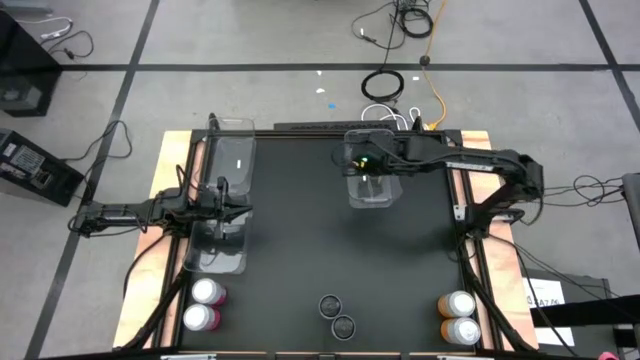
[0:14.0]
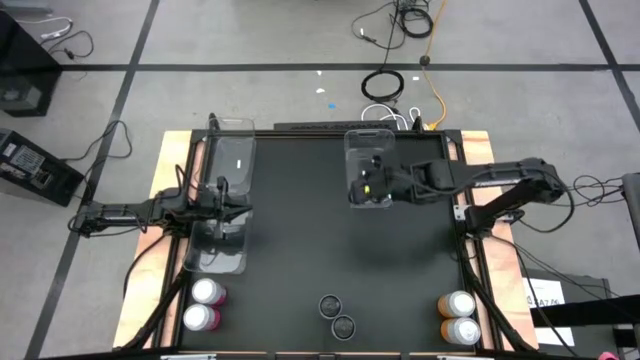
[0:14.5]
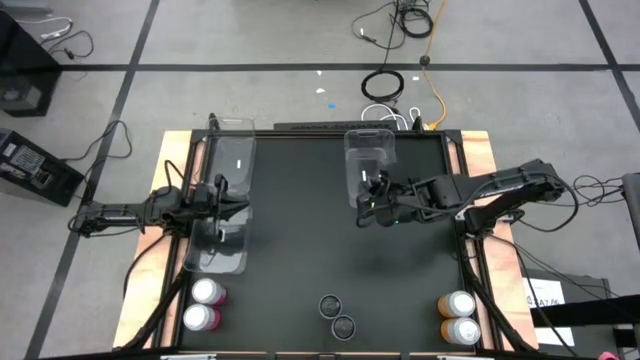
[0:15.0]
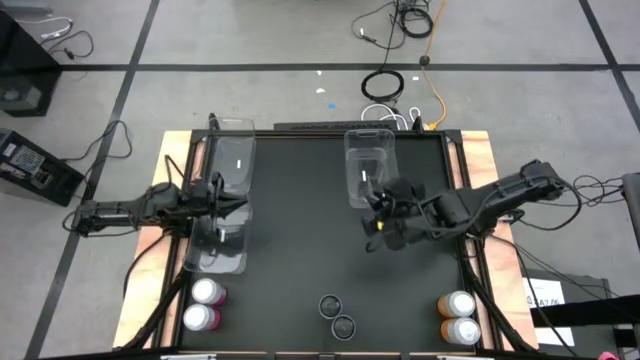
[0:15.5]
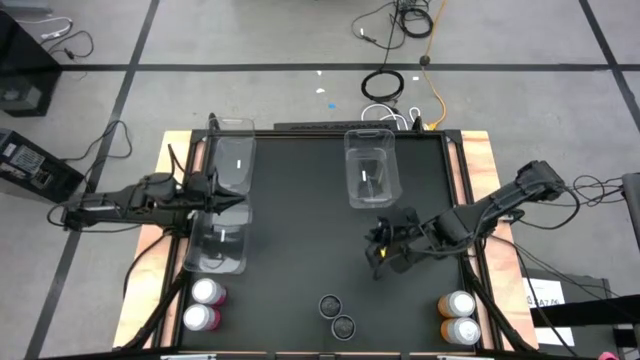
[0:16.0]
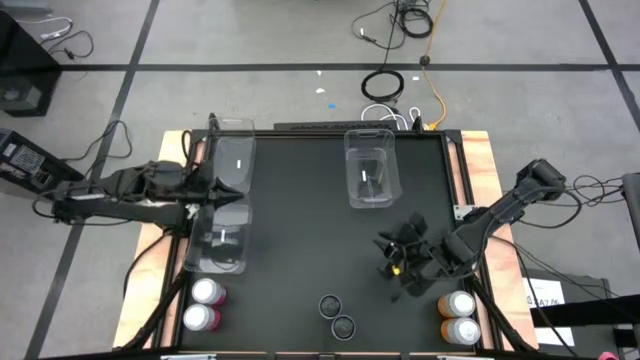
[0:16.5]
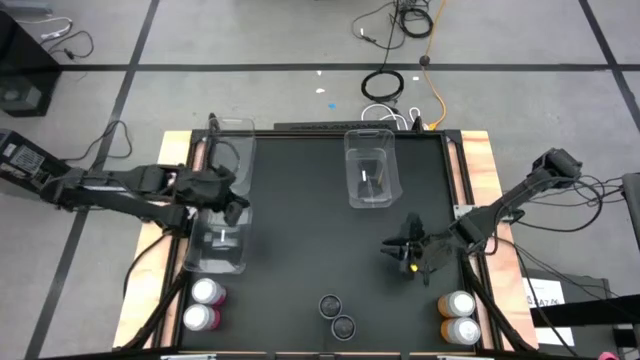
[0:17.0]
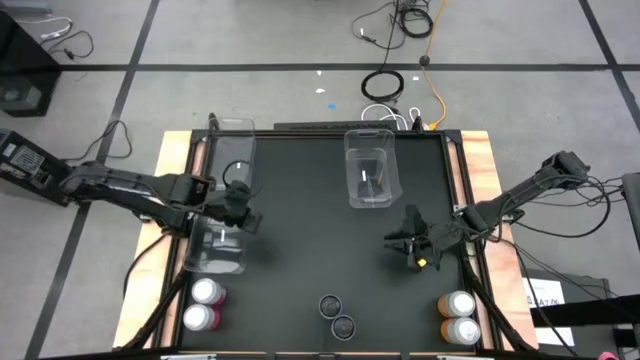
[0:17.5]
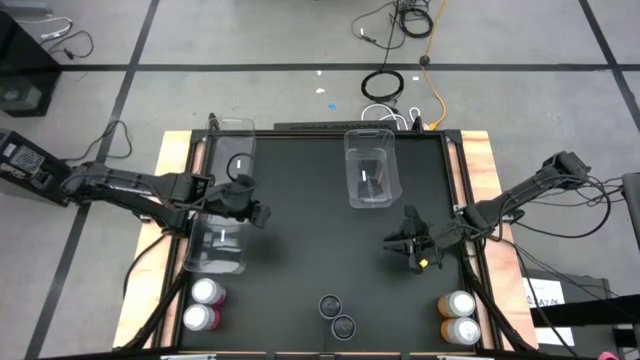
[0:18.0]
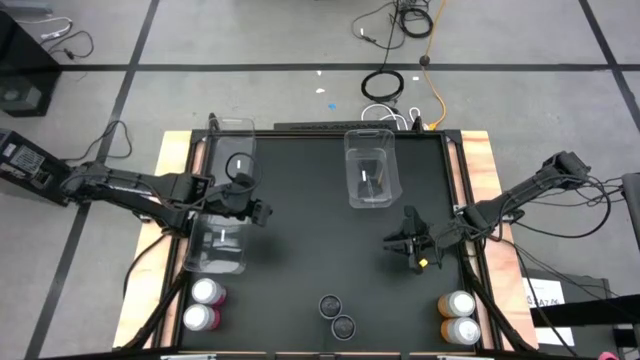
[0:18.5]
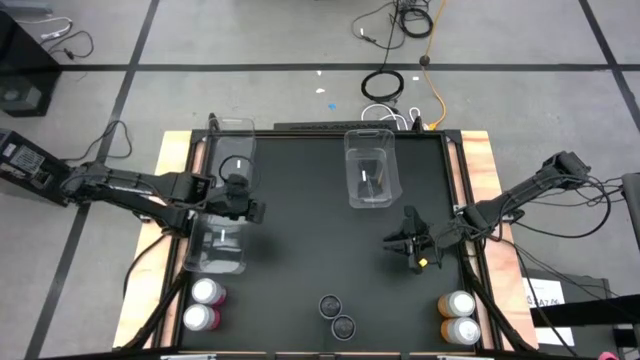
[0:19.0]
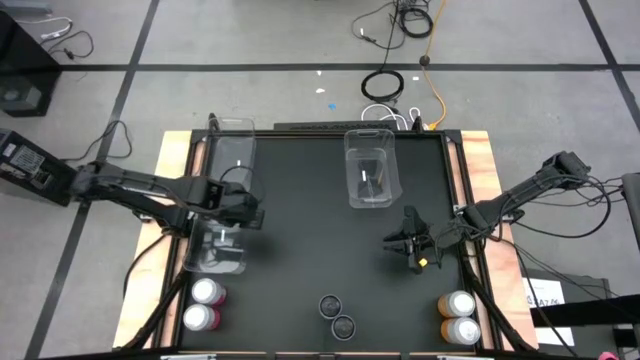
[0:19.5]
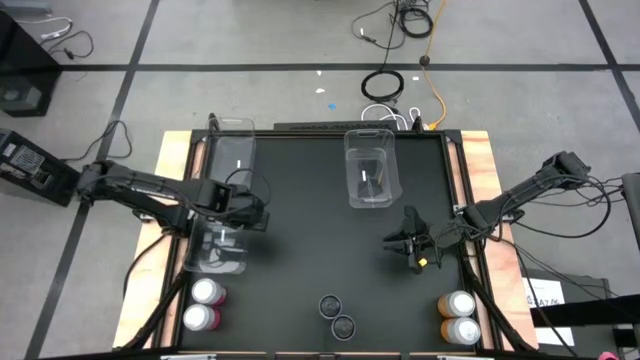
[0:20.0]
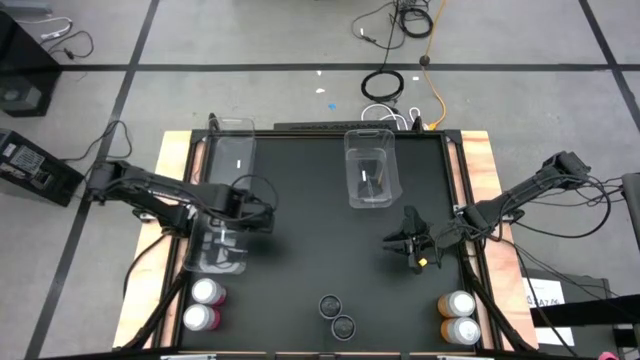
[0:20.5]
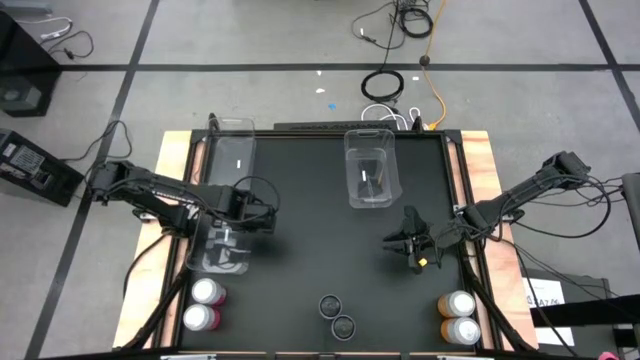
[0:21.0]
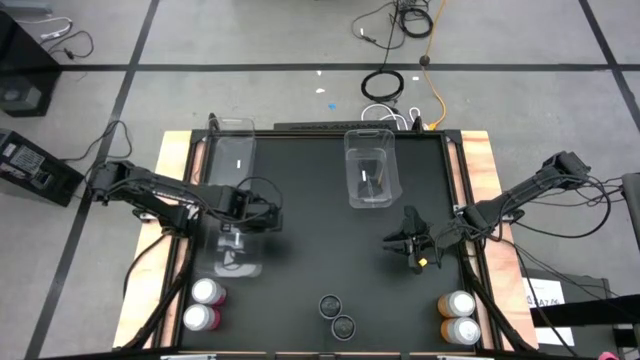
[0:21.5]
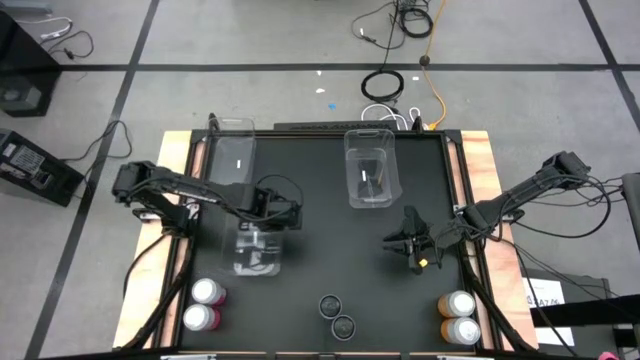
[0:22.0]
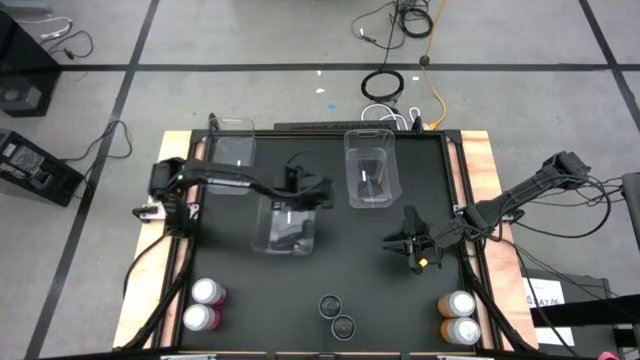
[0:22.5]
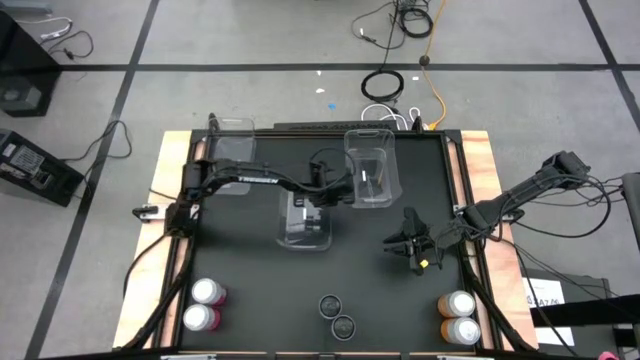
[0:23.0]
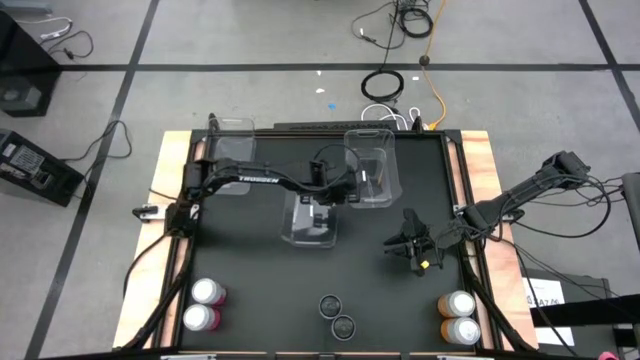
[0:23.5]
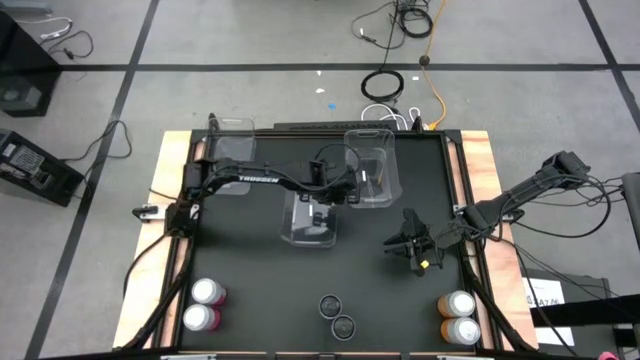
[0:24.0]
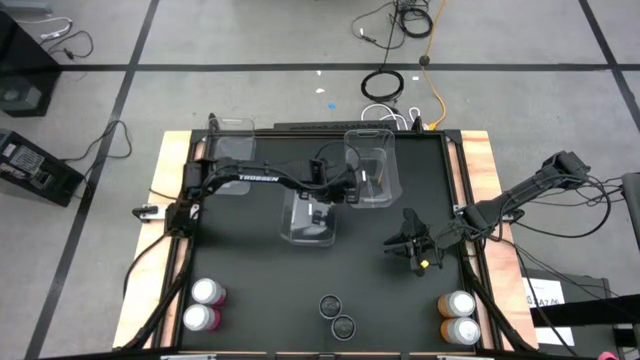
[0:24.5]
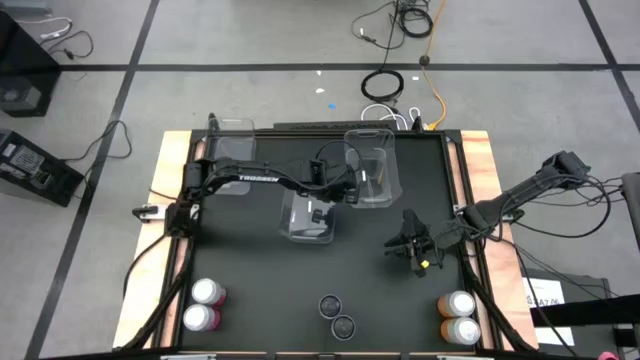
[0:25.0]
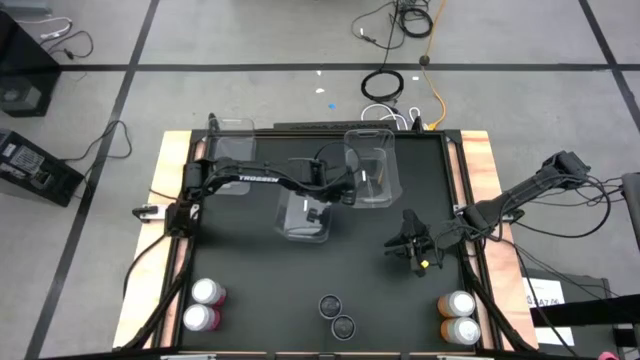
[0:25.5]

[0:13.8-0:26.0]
Task: Sort soda cans
Move the bottom transparent bin to the center of the table. Move the top left transparent bin to the left of the bottom transparent bin

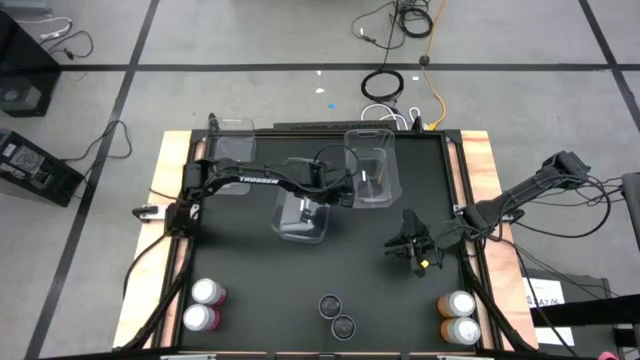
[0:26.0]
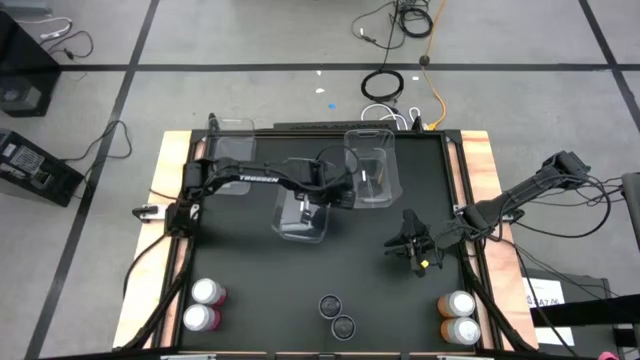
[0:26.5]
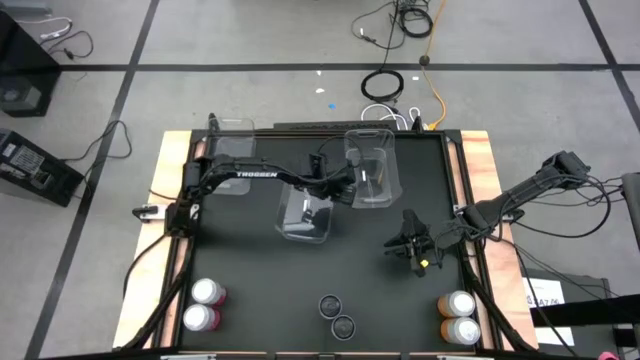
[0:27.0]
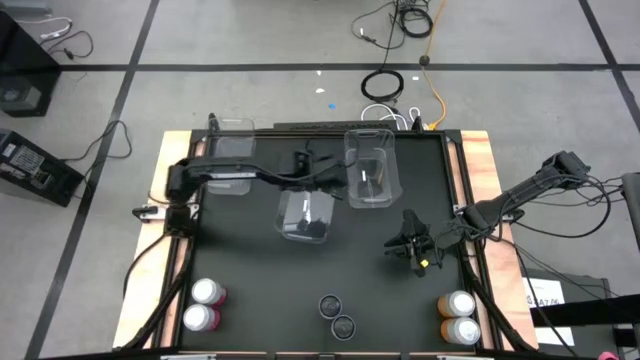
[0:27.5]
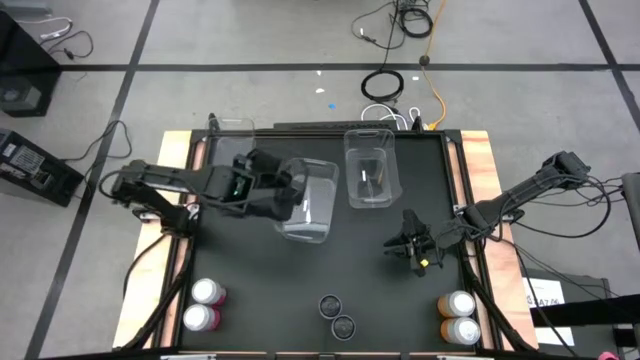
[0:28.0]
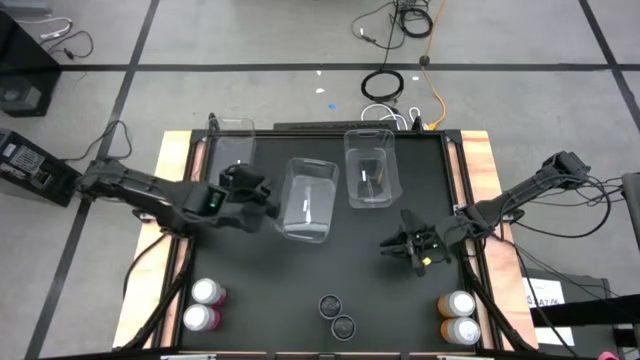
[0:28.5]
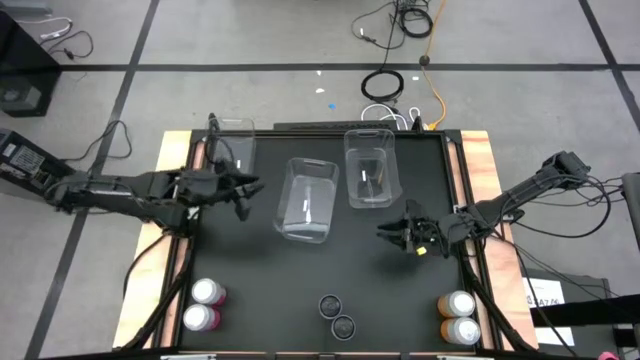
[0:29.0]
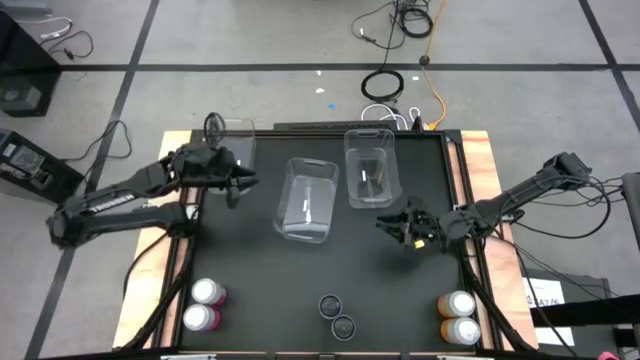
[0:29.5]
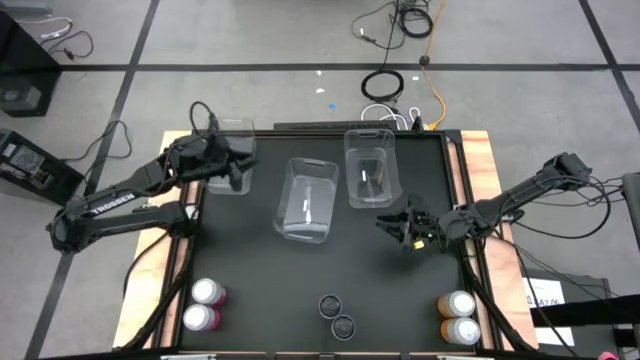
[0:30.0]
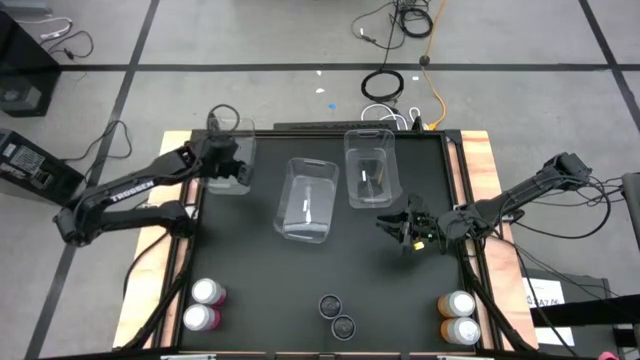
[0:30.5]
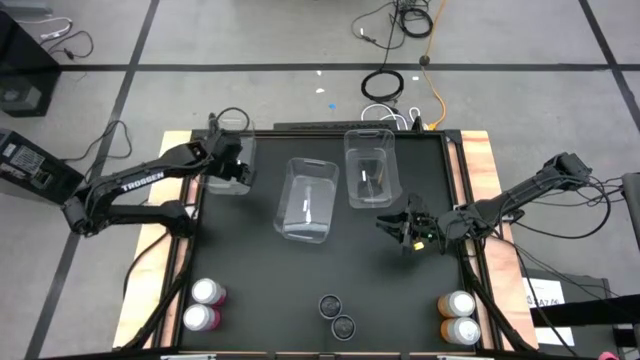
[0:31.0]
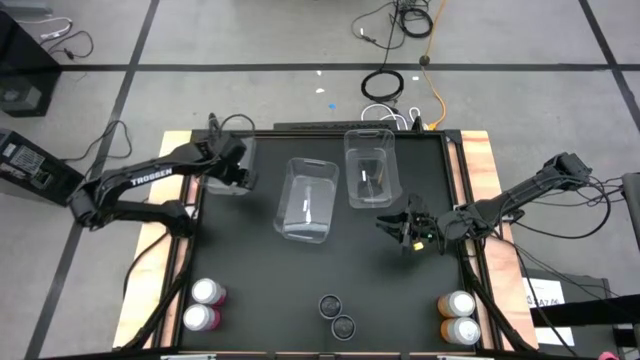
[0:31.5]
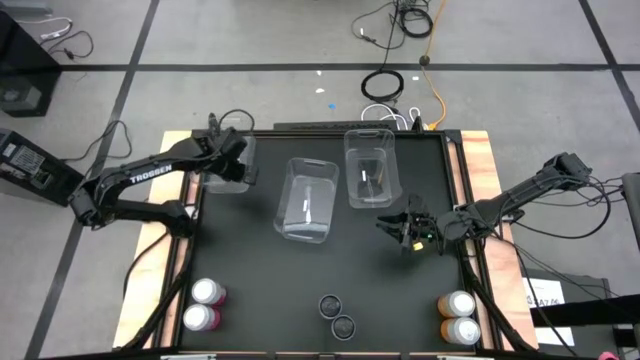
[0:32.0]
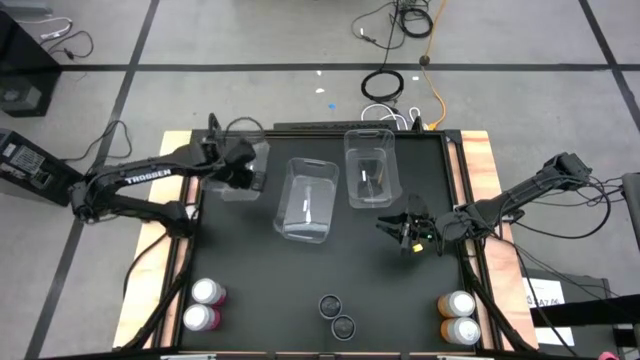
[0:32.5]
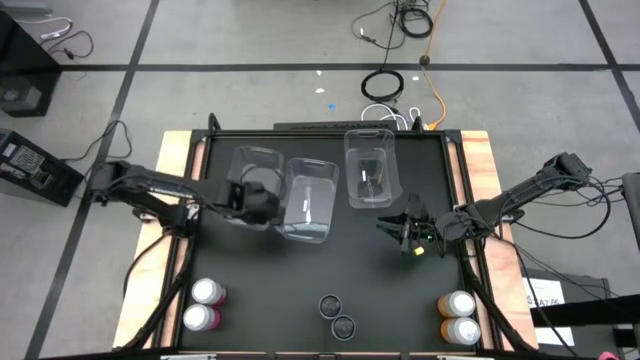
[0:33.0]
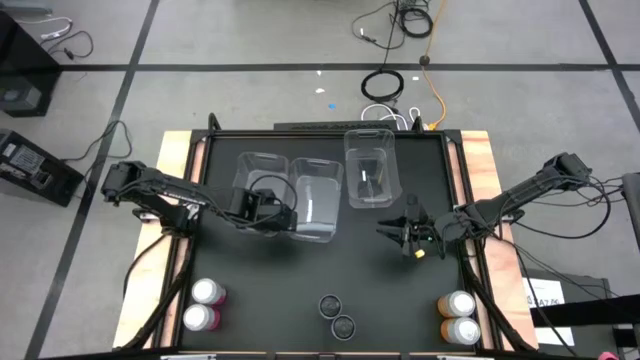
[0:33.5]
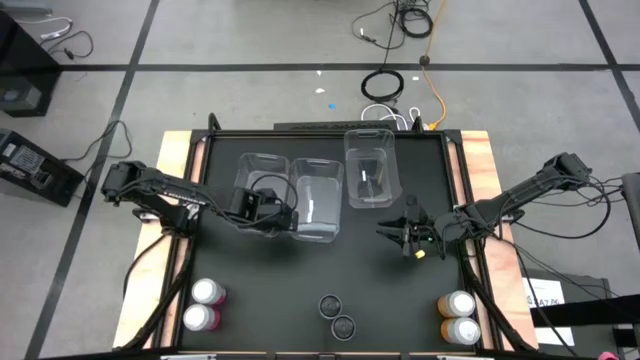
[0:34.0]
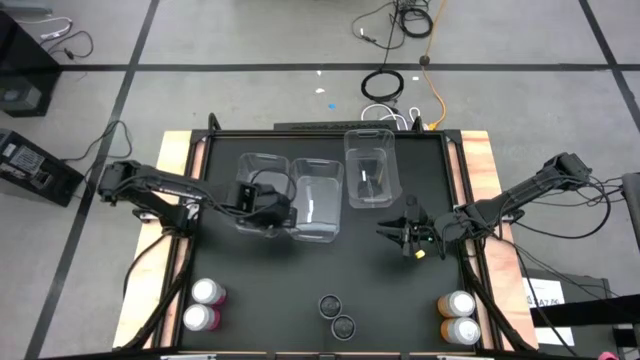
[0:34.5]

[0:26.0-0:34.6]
Move the bottom transparent bin between the two transparent bins
